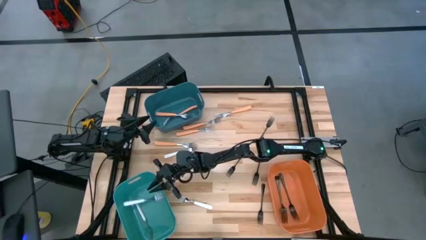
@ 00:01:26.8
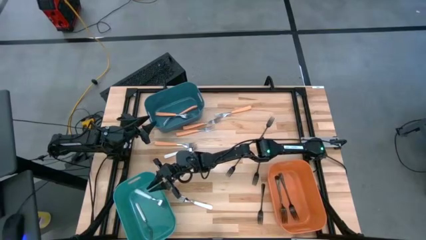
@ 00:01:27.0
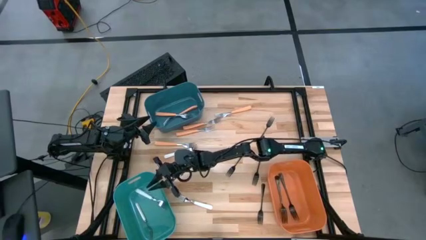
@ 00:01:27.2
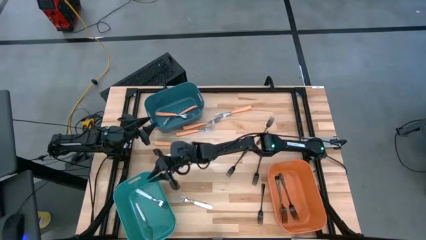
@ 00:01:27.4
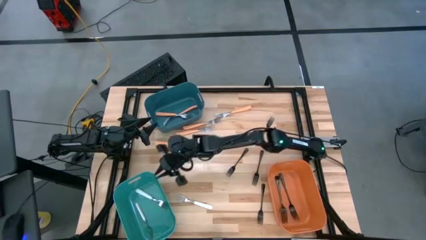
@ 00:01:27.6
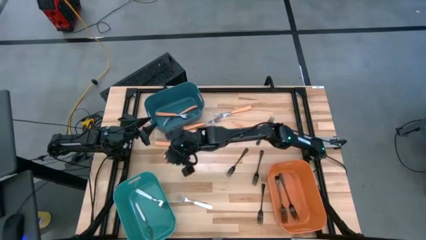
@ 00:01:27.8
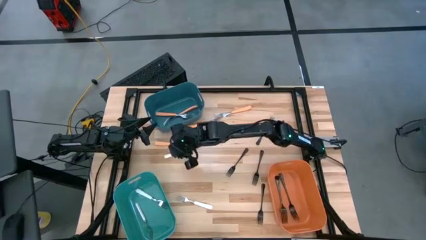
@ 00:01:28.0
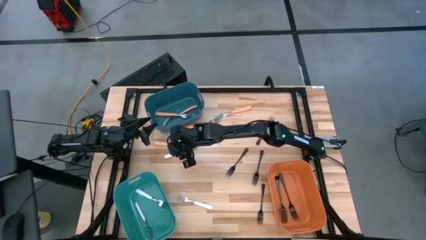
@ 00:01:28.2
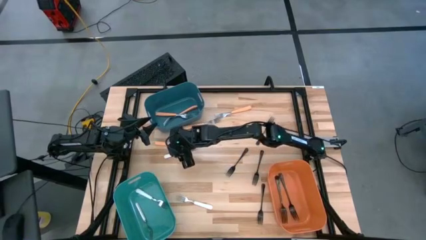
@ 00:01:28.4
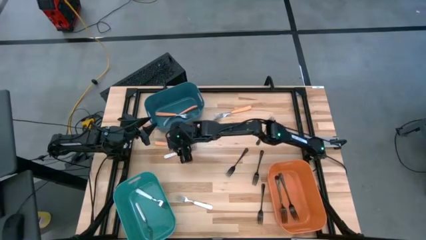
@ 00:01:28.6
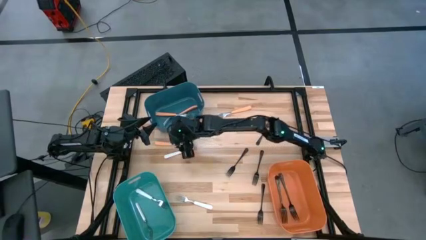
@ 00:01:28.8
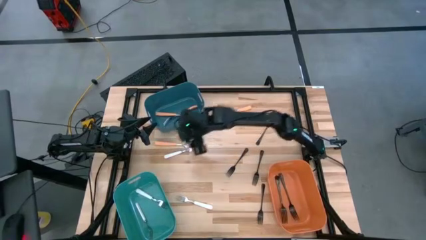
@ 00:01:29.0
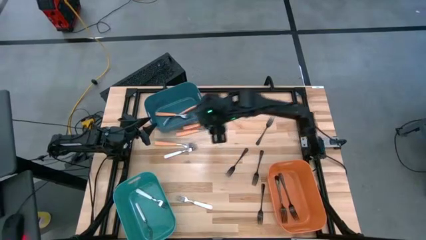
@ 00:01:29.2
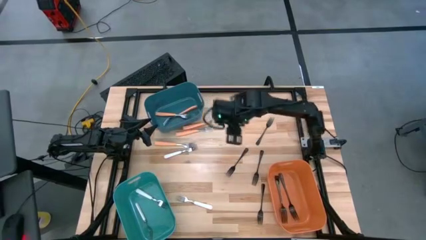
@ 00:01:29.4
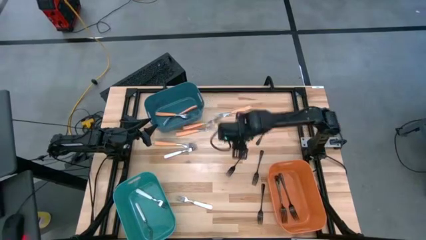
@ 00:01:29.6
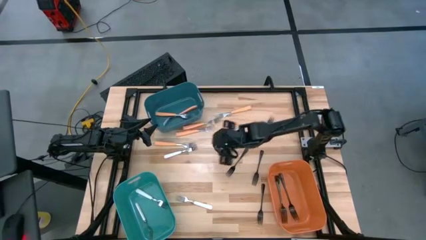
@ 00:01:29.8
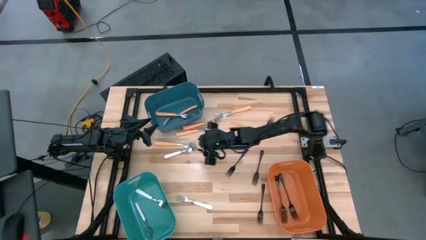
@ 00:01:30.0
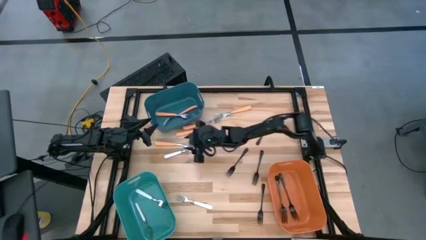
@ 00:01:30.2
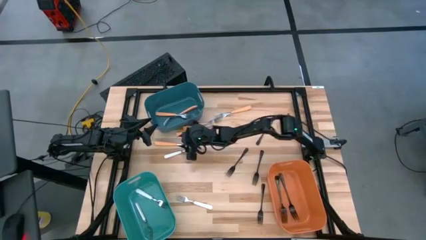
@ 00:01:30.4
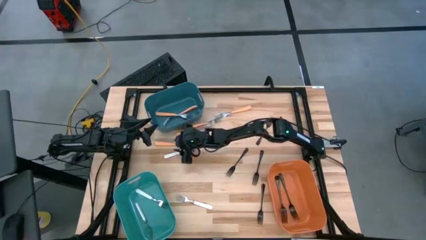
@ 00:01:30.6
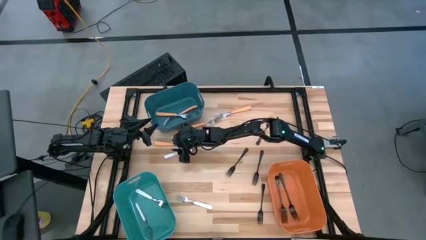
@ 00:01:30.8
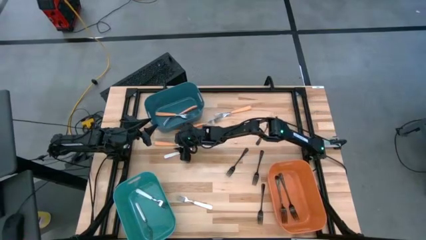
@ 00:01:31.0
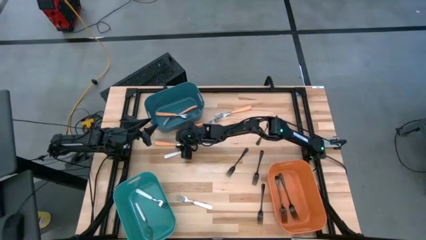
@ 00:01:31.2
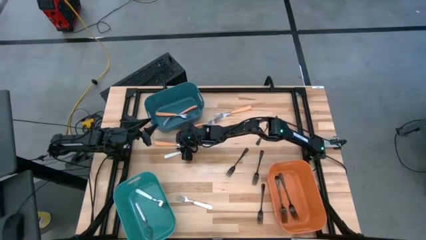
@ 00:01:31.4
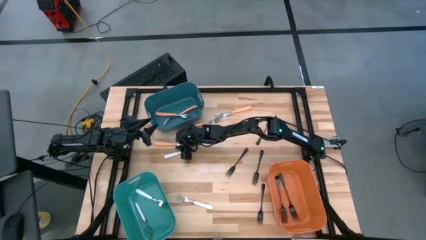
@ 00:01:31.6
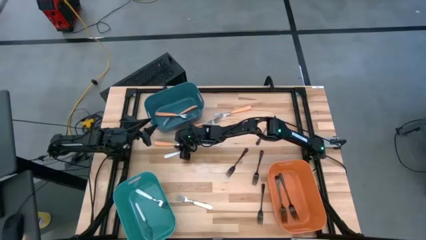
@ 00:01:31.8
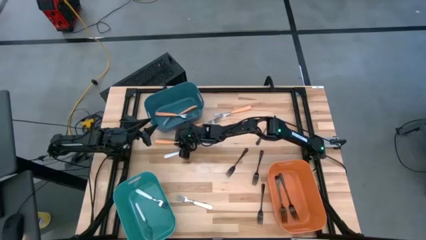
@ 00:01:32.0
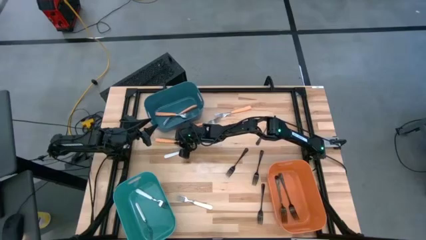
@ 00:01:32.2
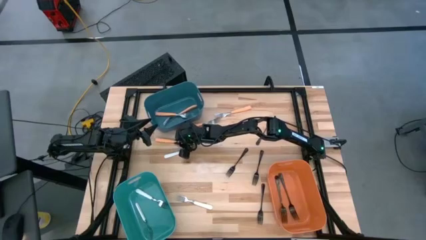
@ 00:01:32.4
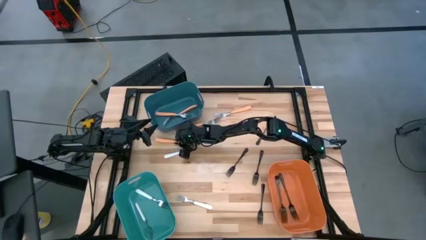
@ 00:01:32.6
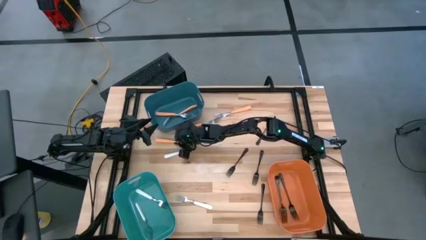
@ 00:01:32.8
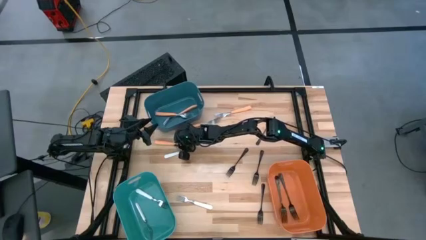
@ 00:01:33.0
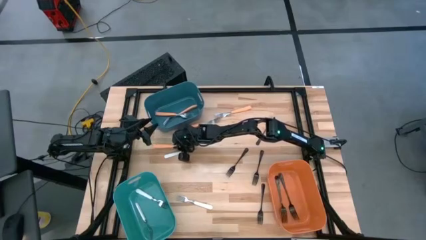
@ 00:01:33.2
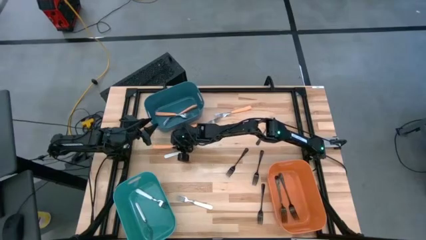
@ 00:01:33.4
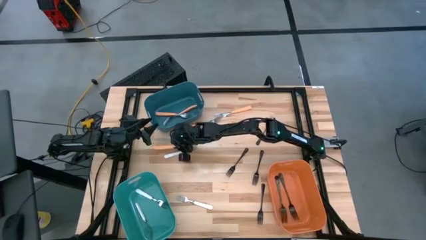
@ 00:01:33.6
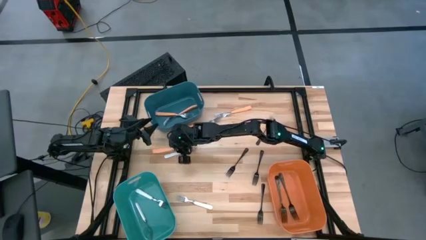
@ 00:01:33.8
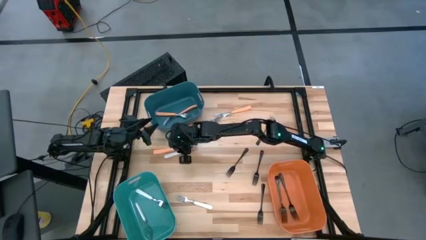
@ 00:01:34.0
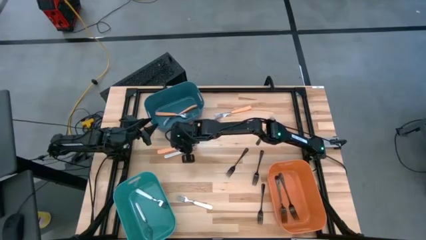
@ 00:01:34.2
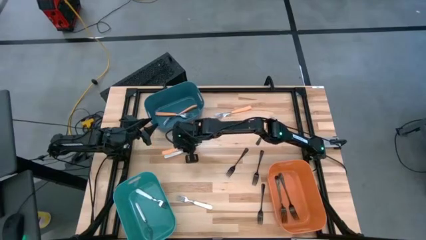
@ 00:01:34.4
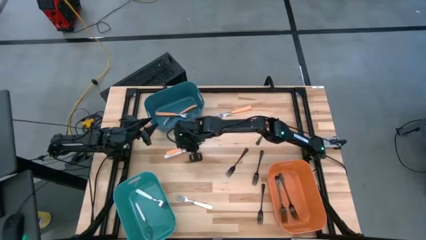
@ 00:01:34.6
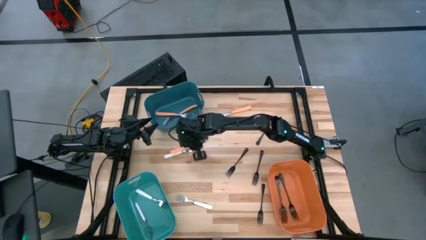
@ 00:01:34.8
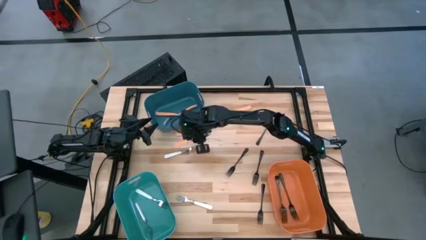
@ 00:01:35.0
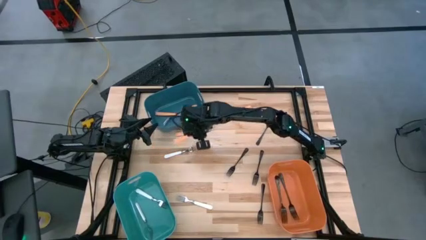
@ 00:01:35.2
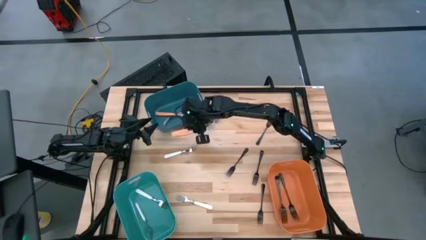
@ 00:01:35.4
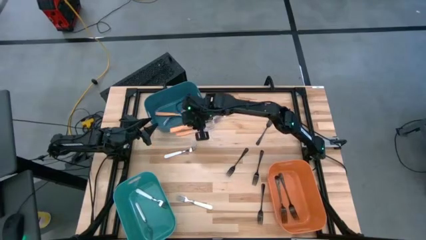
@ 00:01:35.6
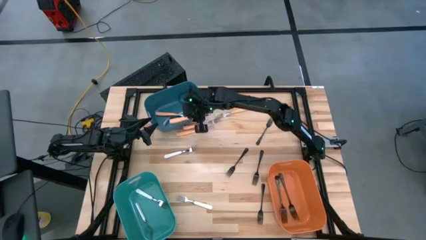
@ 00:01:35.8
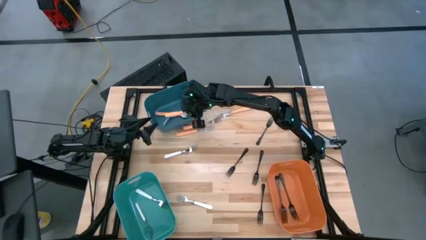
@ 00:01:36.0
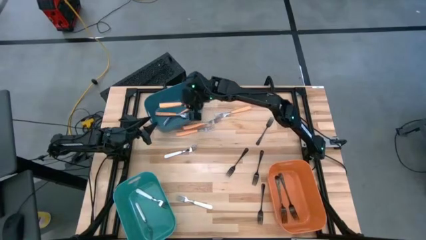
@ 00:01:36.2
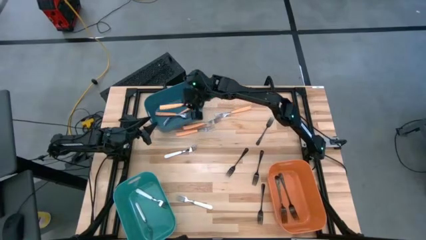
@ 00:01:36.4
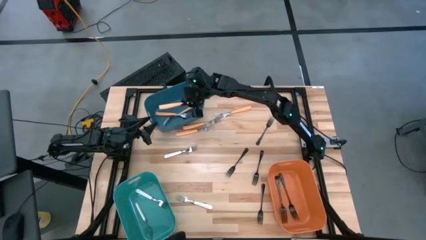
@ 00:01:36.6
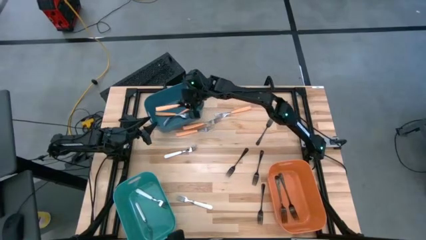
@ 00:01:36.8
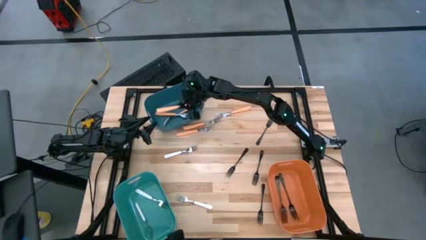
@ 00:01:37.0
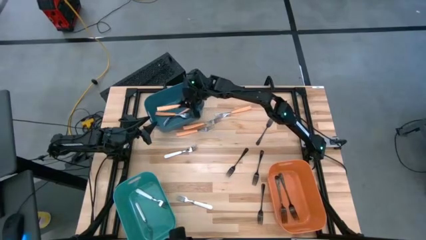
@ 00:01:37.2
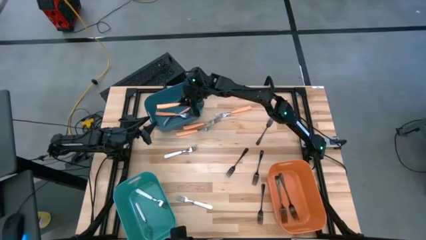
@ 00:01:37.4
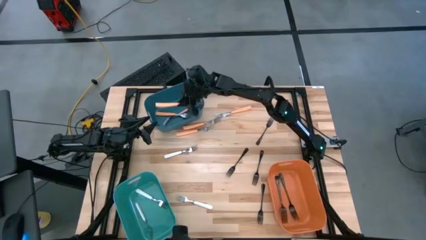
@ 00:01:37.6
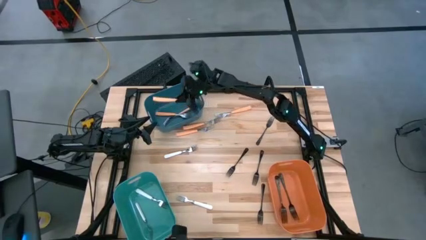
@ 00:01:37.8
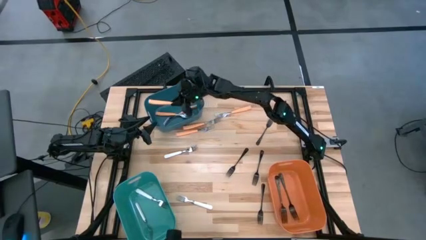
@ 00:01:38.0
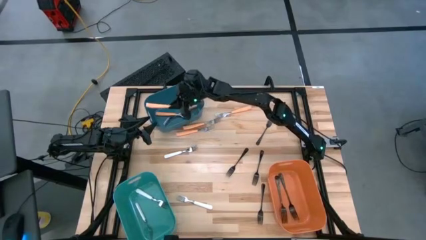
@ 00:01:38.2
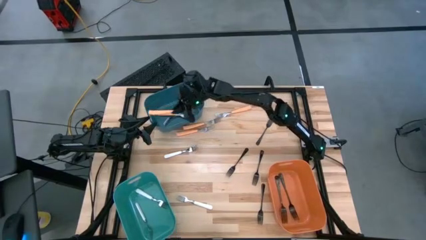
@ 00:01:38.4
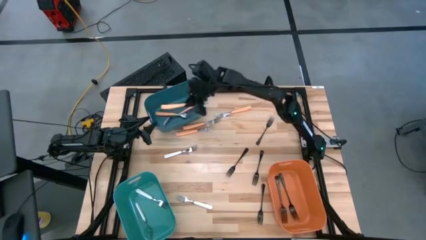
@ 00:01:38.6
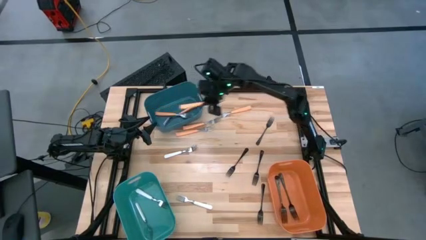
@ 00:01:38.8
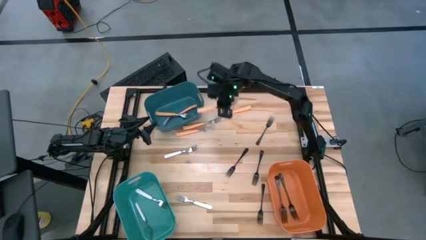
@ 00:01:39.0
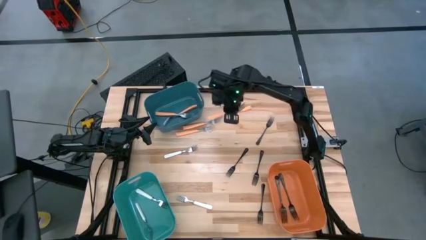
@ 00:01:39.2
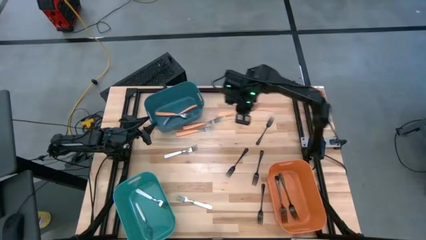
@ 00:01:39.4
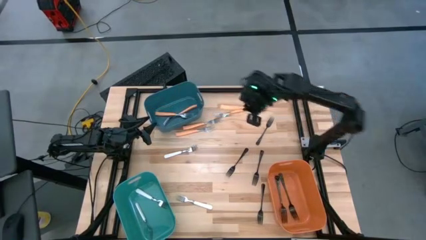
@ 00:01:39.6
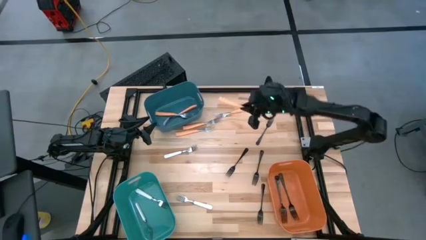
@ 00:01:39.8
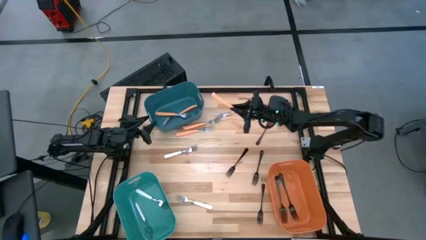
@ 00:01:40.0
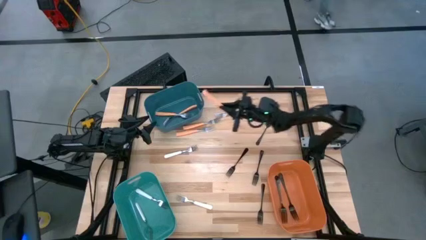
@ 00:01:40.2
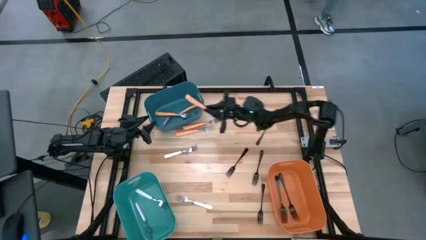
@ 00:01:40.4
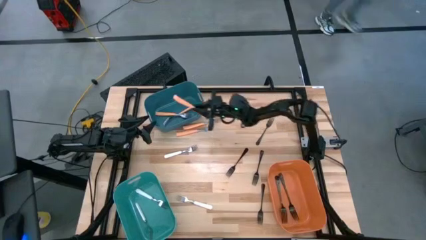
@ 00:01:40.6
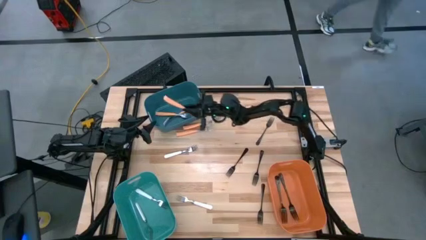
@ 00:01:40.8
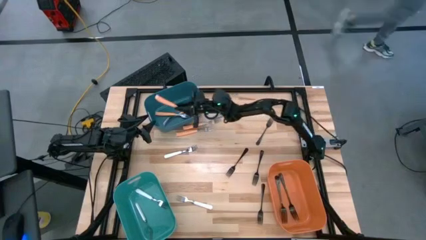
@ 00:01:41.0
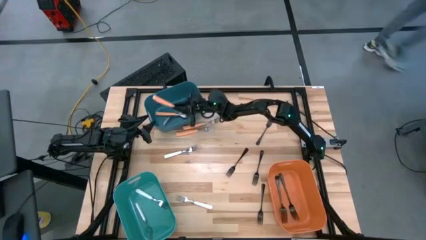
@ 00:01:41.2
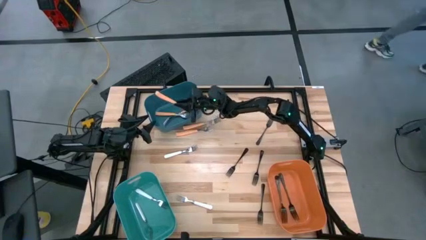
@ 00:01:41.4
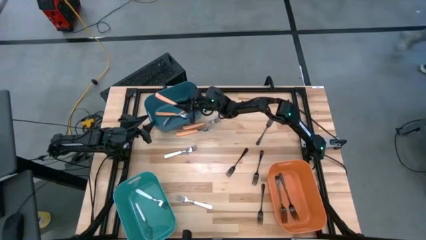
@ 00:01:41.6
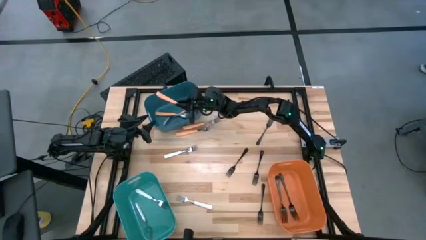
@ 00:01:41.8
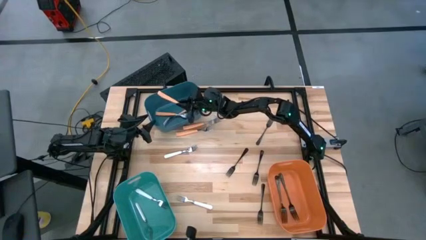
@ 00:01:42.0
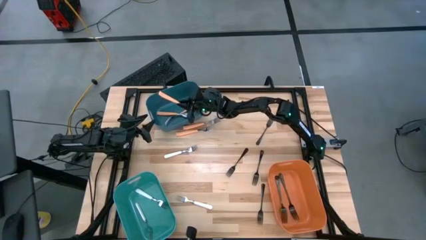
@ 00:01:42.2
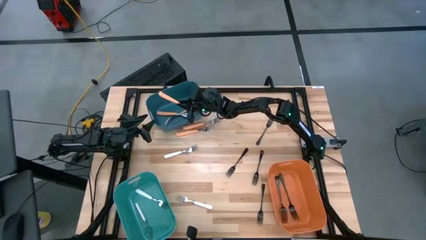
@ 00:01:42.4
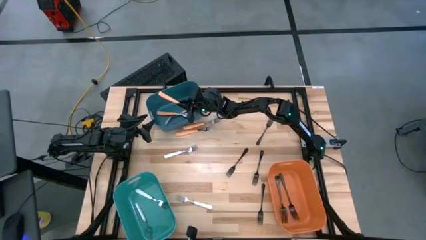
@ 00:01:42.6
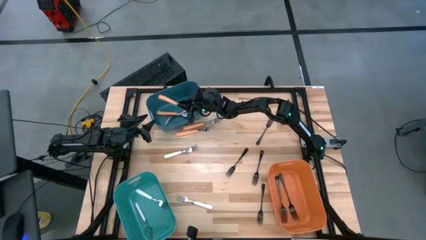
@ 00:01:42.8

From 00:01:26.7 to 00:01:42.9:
Task: Sort silverware by color (type)
Put the orange fork into the blue bin
